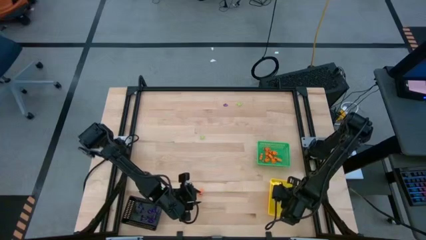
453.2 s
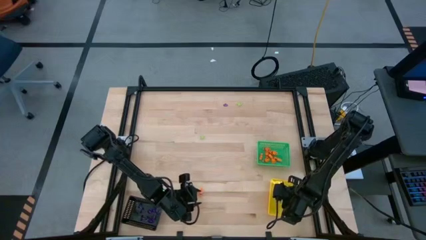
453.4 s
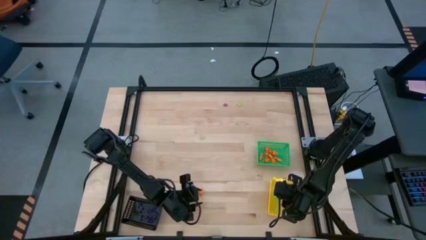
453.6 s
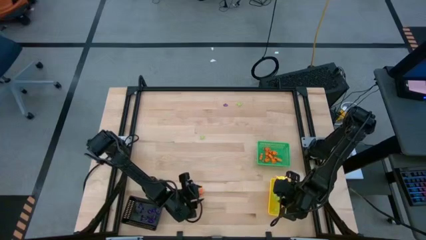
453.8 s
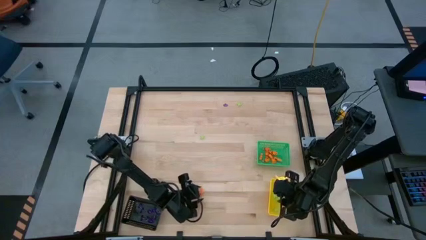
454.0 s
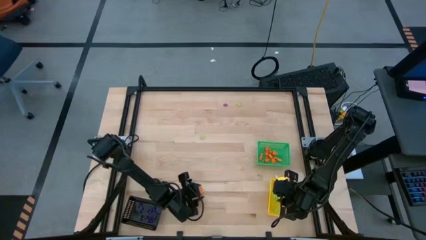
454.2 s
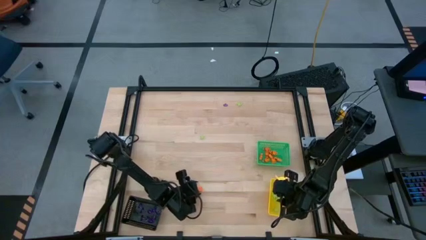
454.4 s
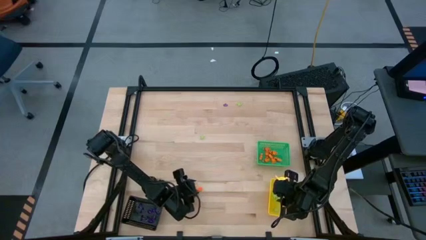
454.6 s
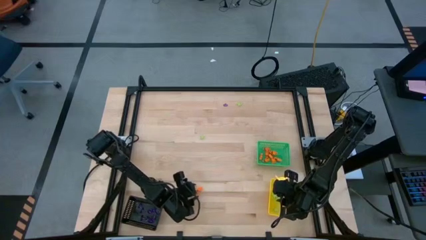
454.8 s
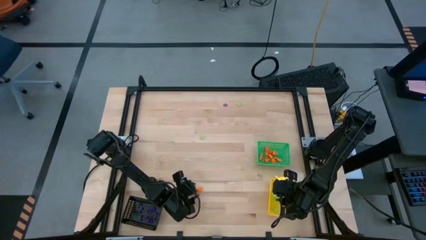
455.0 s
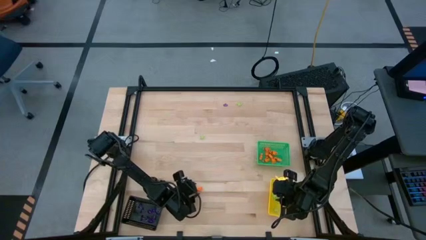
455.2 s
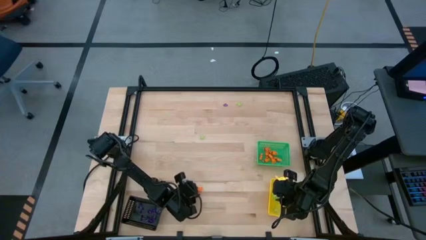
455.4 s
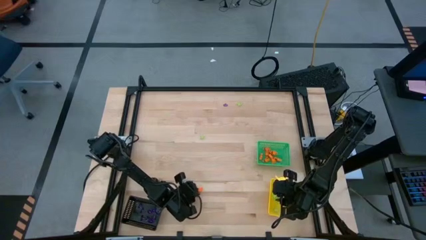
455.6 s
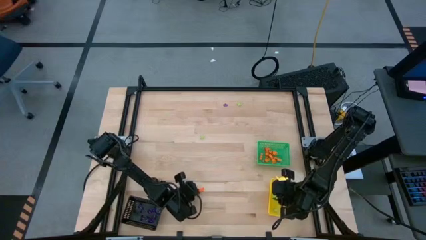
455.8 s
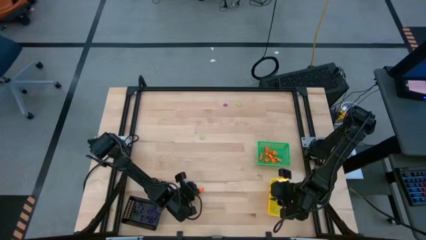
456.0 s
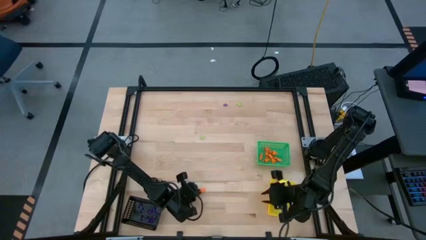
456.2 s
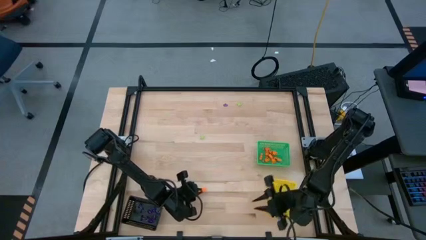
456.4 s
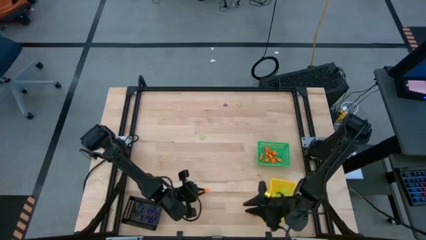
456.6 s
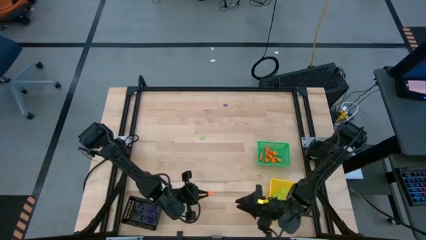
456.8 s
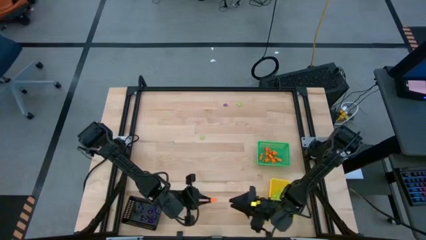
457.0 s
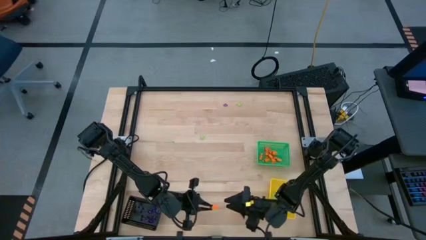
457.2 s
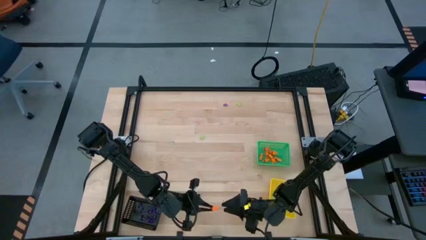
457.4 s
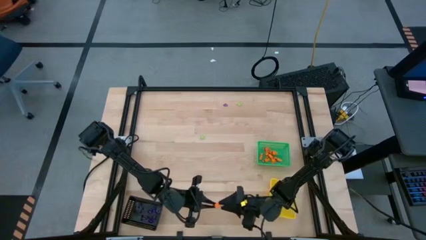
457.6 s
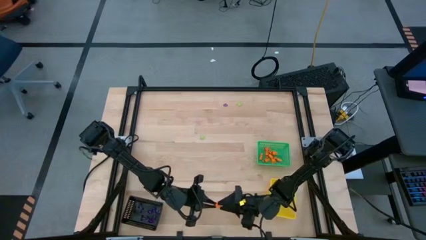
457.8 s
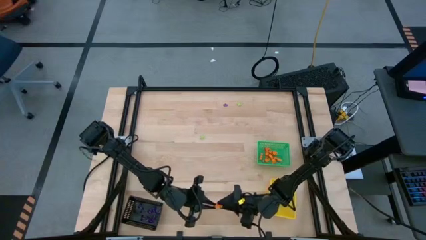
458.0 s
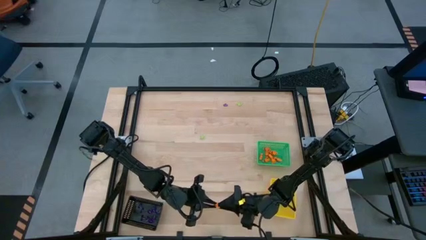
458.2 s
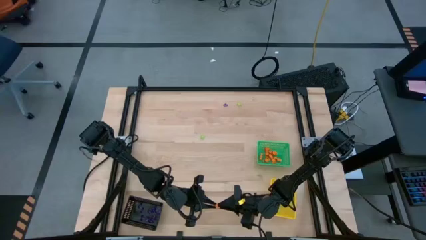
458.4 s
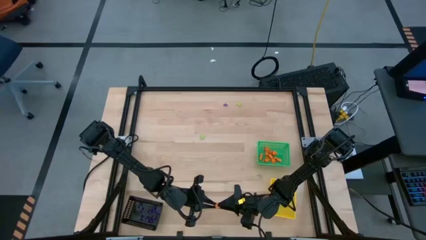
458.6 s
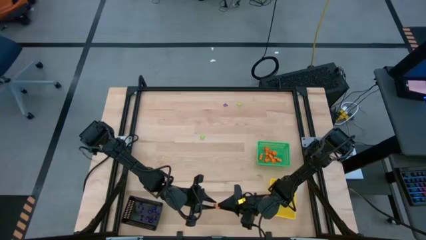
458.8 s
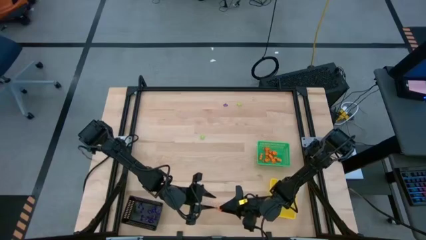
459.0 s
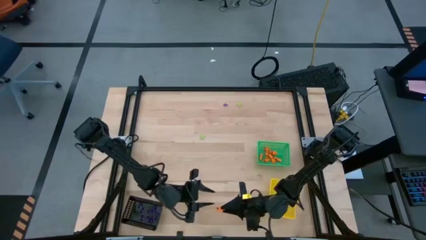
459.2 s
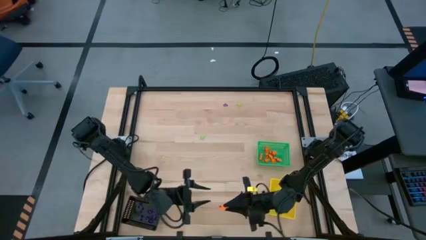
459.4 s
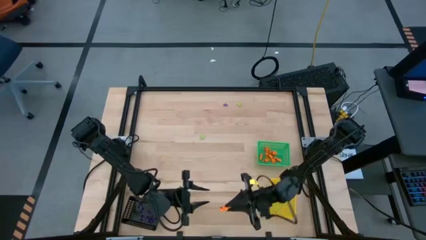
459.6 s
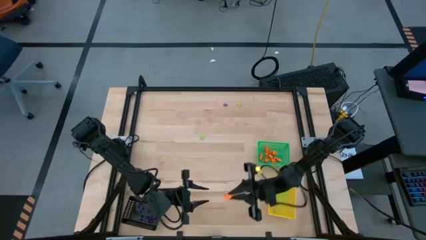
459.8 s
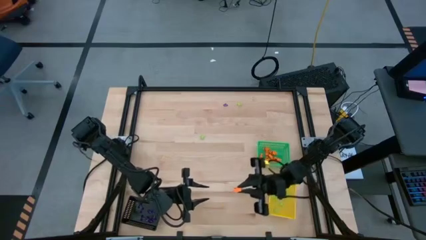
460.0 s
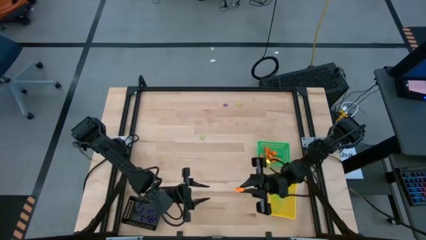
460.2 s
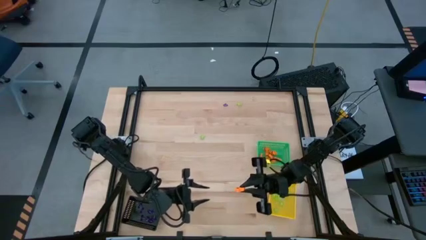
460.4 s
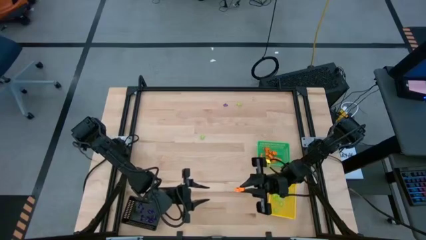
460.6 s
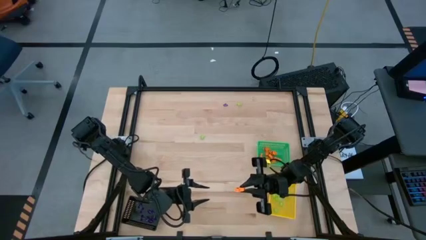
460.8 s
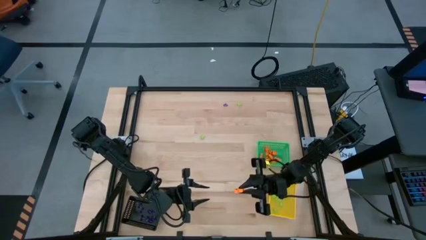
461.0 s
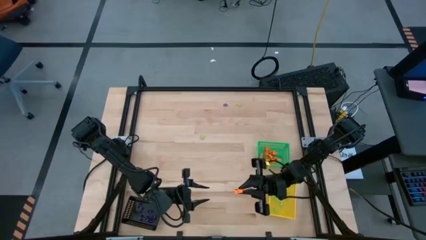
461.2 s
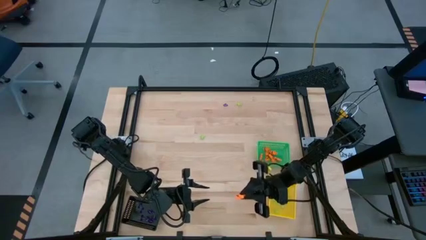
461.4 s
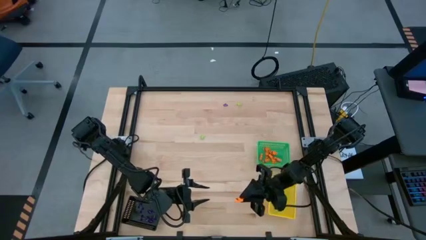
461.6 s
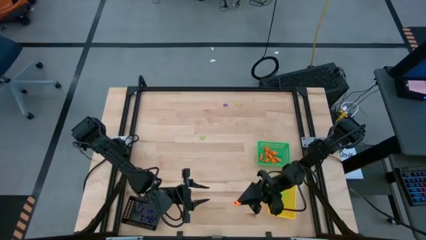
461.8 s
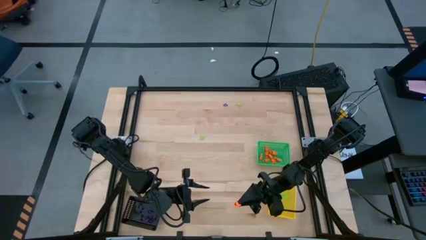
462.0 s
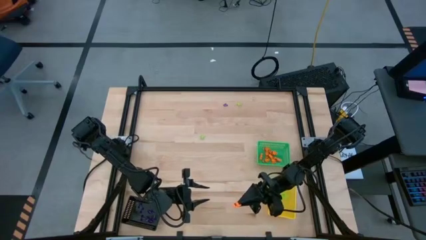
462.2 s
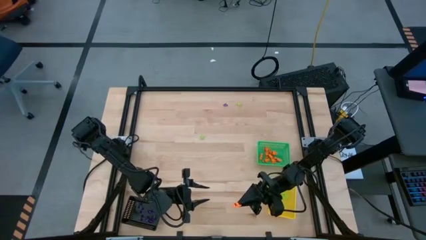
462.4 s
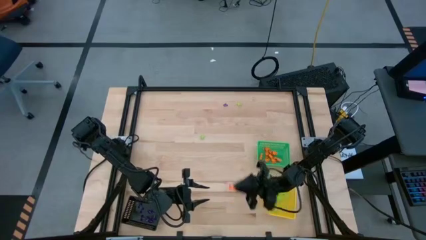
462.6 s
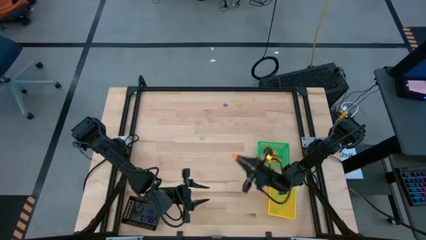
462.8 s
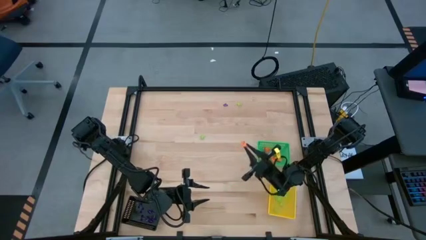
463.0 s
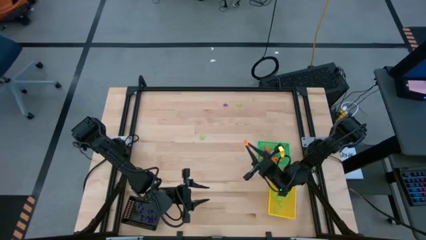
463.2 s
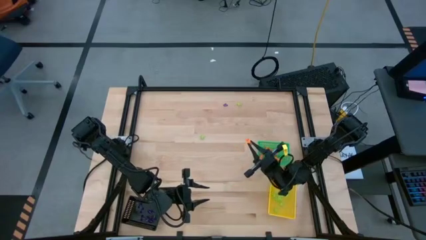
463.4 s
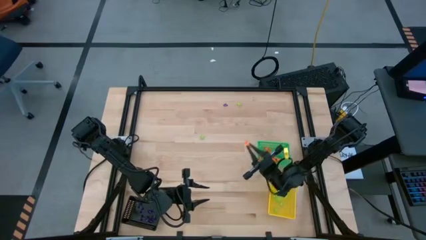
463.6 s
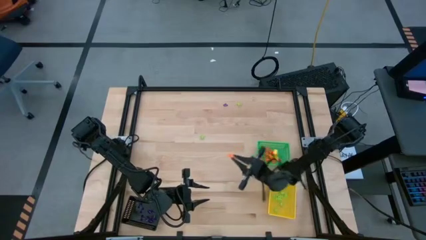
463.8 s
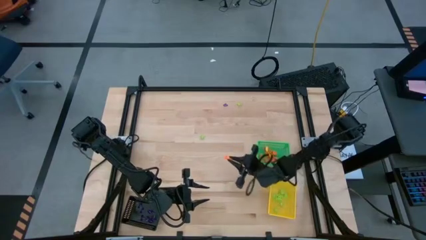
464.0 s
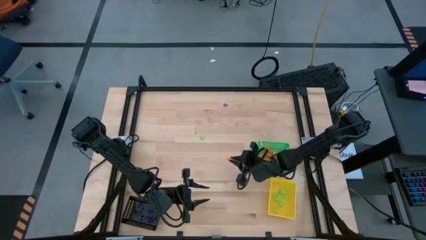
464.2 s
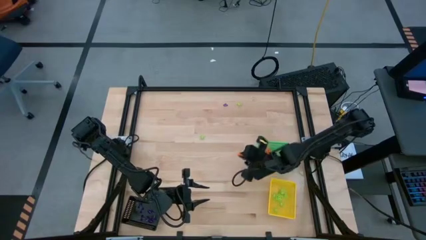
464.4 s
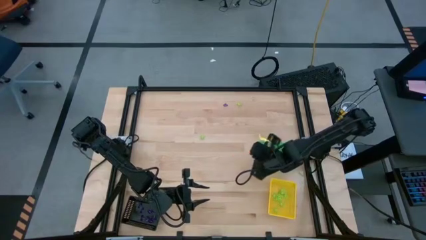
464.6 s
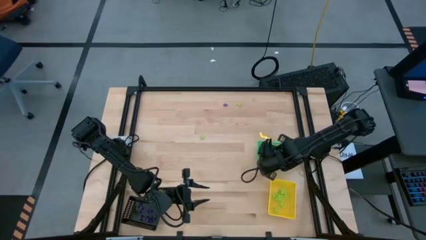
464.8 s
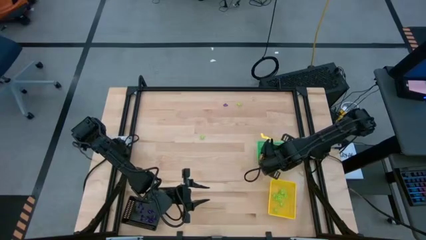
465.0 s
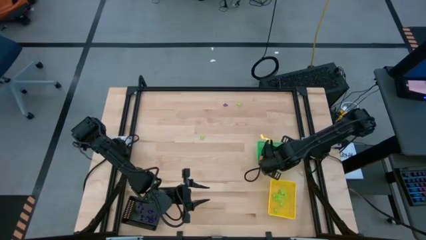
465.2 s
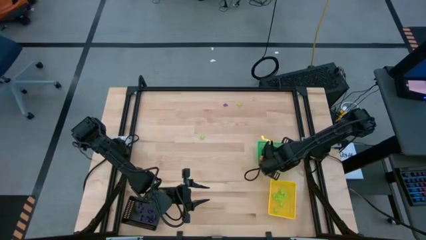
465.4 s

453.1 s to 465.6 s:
Task: Sort Halloween decoration
Put the orange skeleton toy into the green bin
